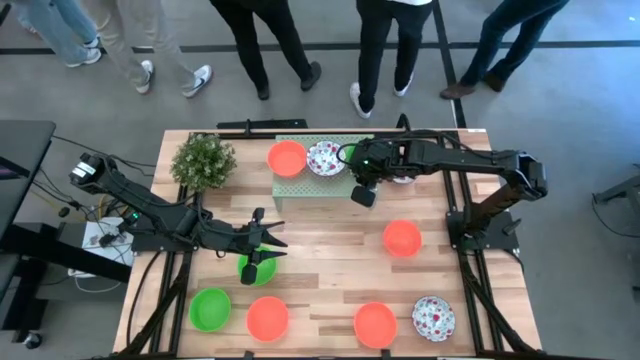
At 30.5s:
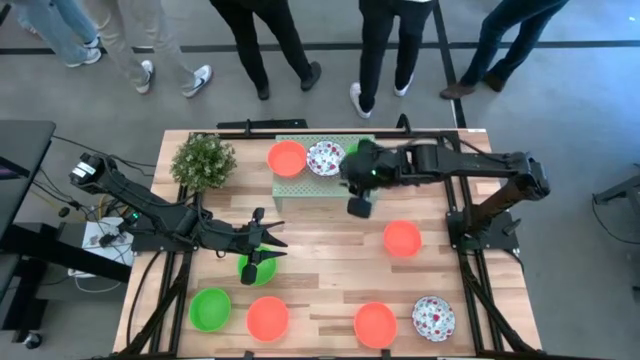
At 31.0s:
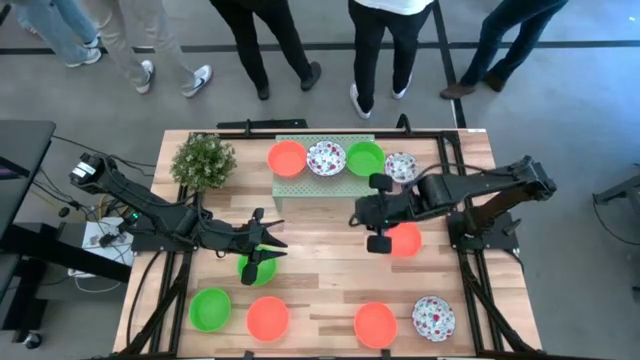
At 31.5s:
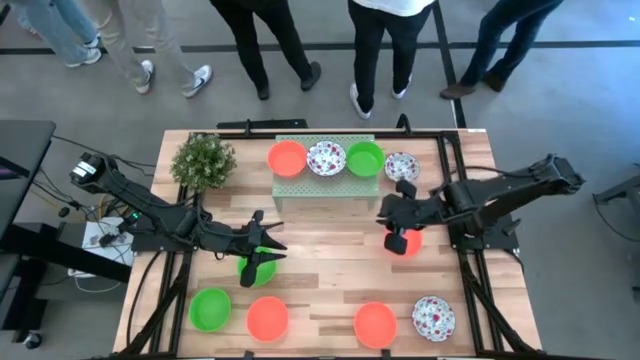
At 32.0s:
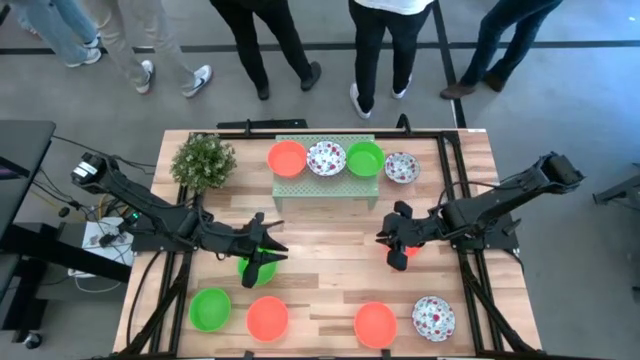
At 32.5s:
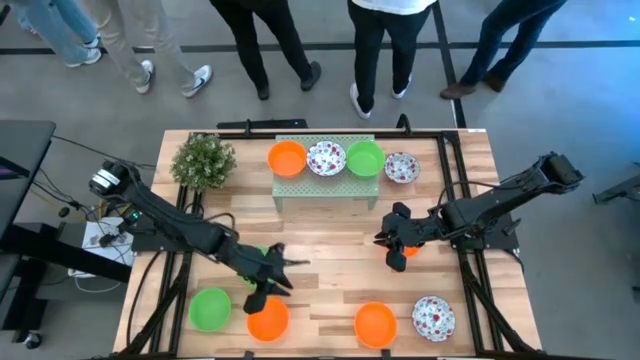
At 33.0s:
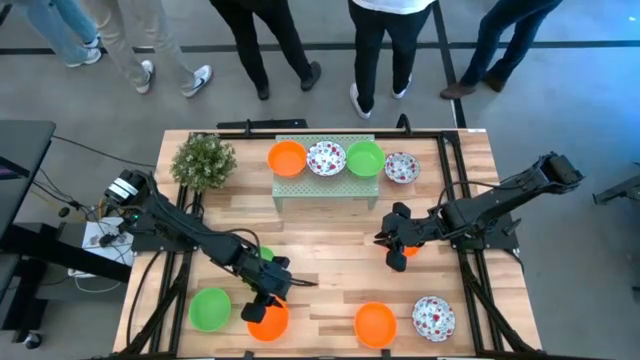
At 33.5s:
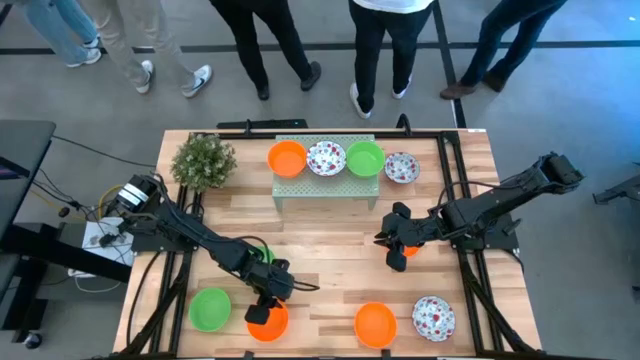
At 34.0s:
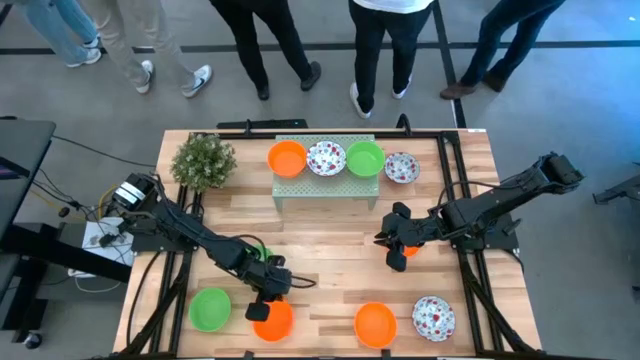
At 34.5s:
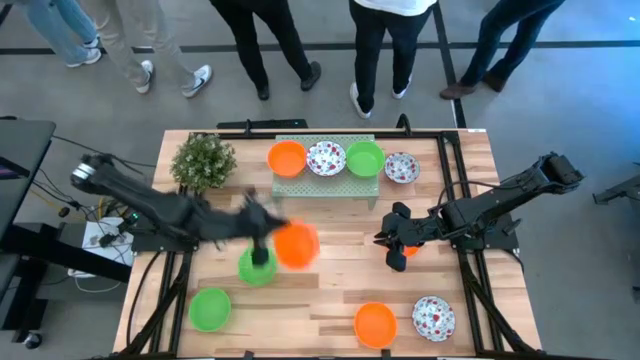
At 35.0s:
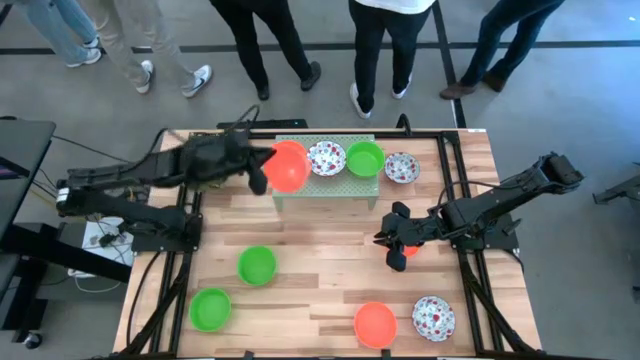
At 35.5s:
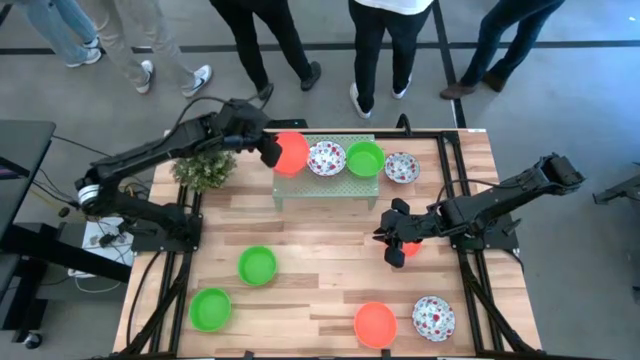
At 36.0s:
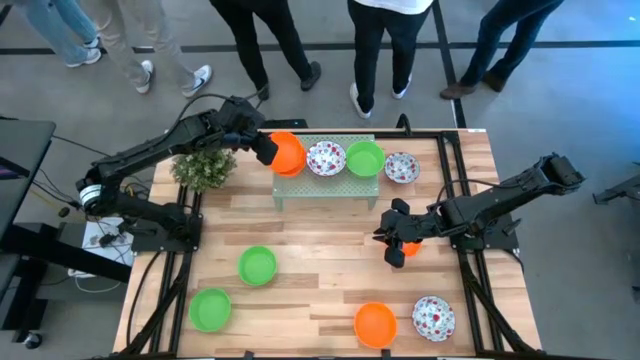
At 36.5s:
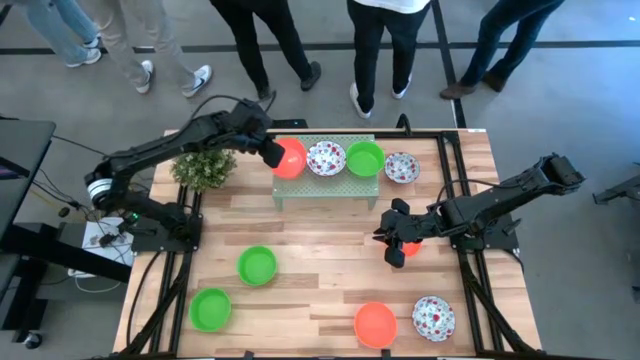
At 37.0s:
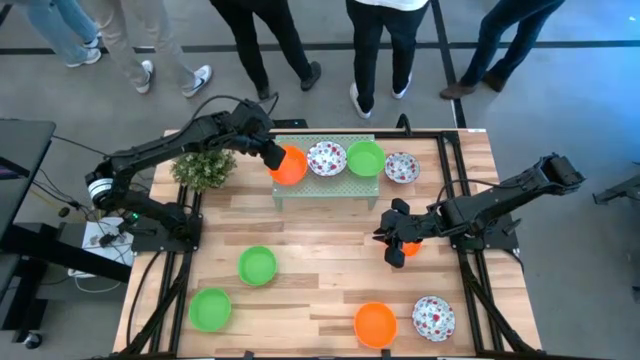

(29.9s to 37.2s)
Task: Pick & Place Mini bowls
Stack the orange bowl onto the other orange bowl on the shelf

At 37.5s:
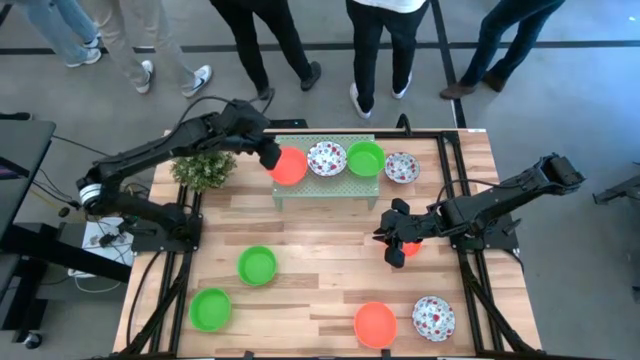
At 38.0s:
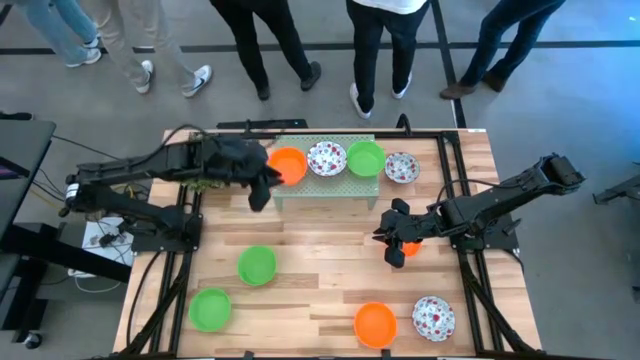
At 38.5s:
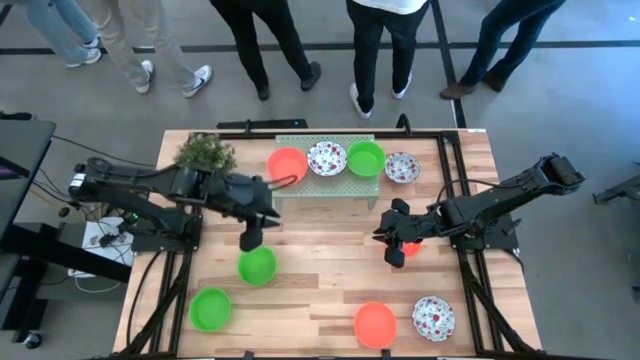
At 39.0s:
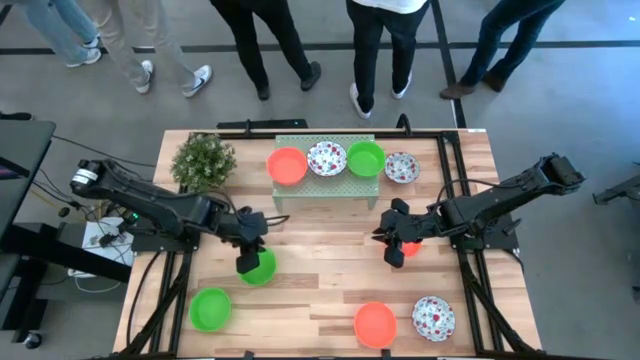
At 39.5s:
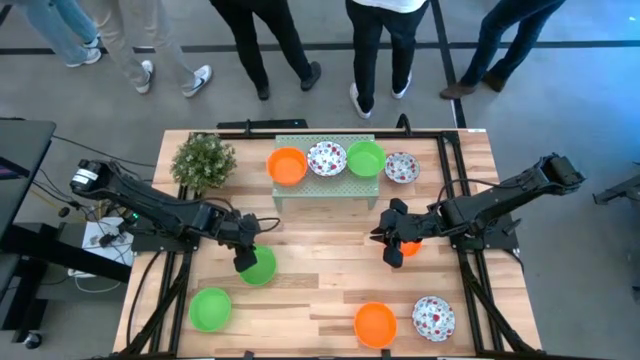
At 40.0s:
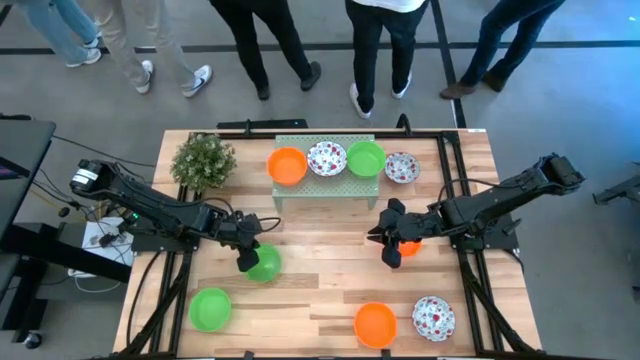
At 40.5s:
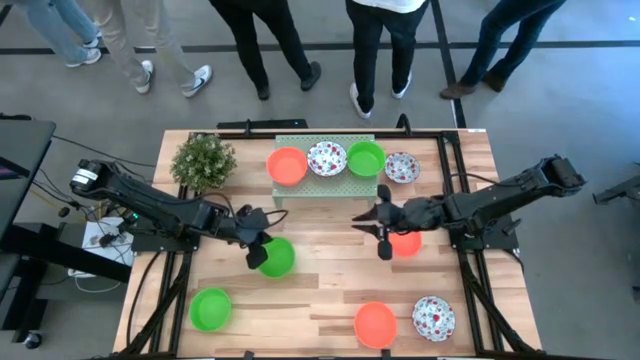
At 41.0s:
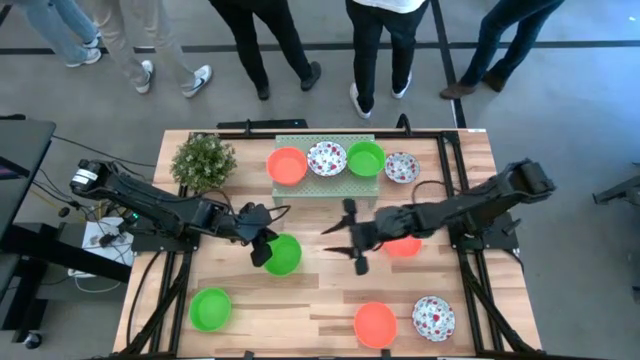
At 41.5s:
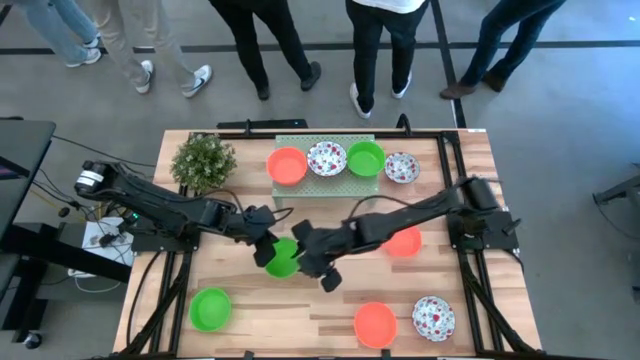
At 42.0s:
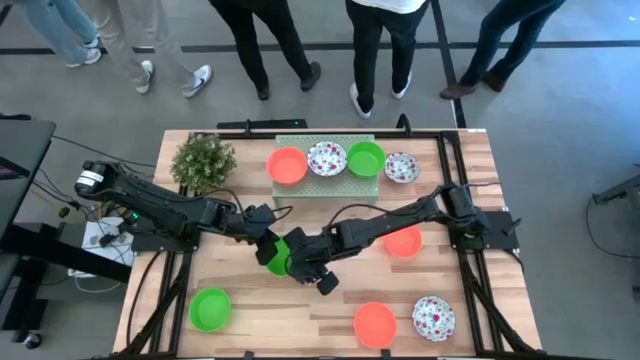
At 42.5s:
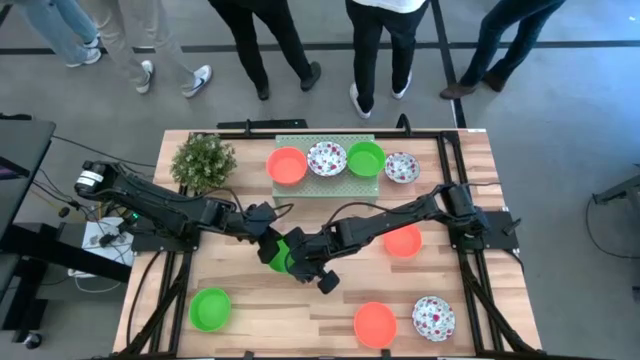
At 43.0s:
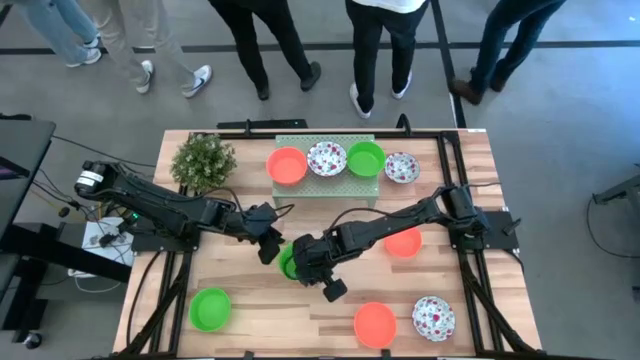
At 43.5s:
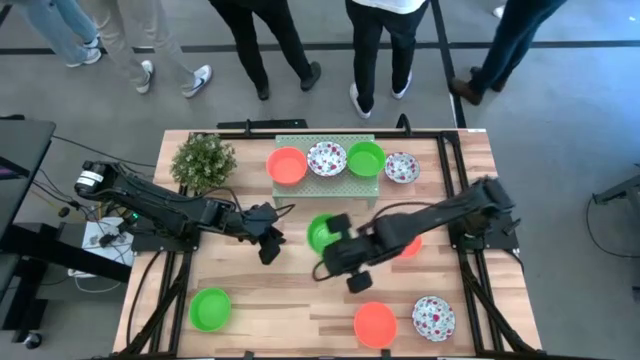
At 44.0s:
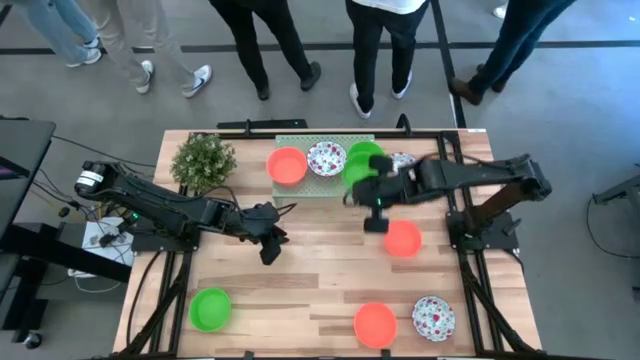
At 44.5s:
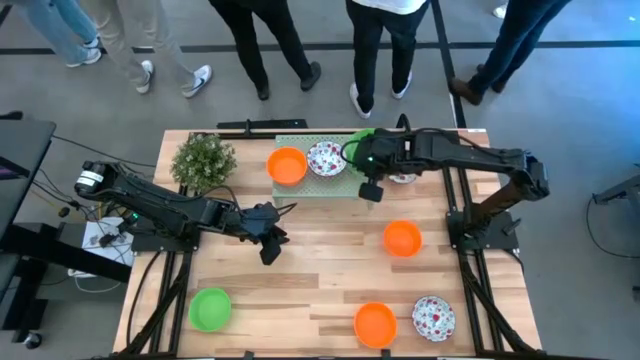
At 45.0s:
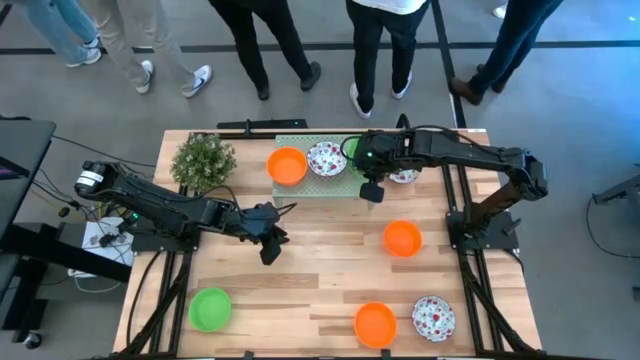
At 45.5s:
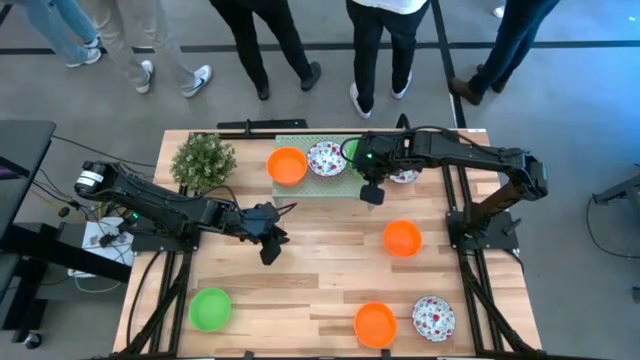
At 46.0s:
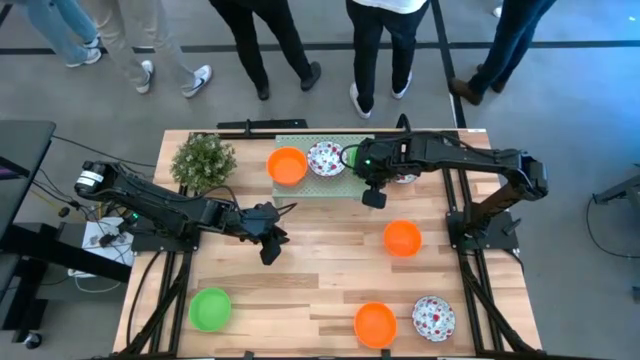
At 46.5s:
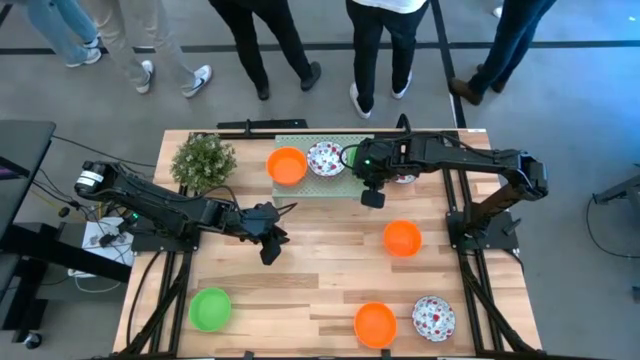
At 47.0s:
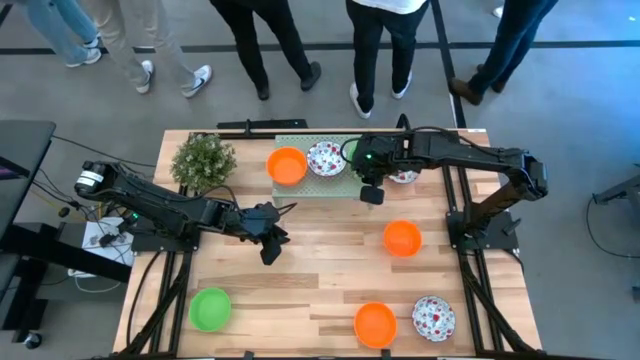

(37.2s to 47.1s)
Stack the right green bowl onto the other green bowl on the shelf

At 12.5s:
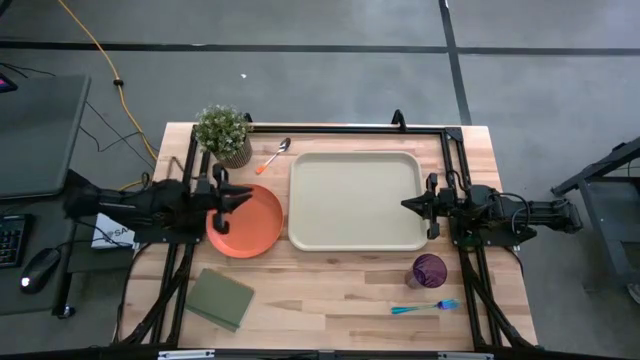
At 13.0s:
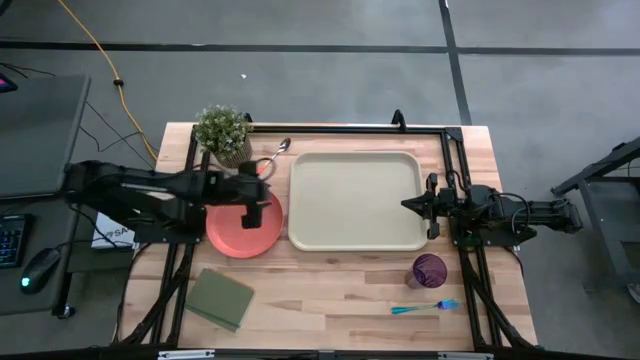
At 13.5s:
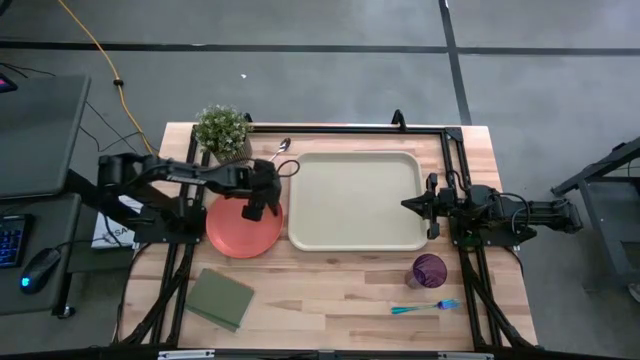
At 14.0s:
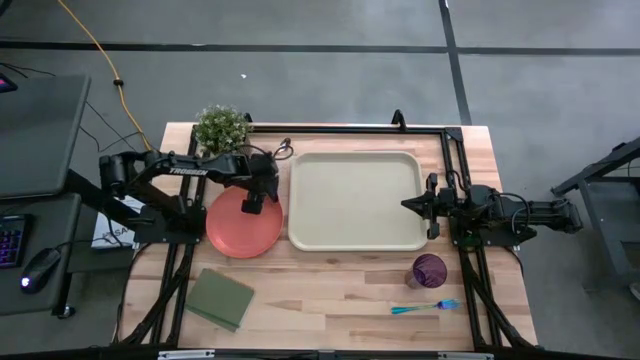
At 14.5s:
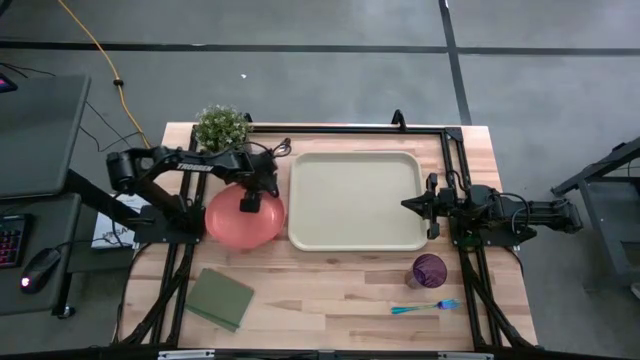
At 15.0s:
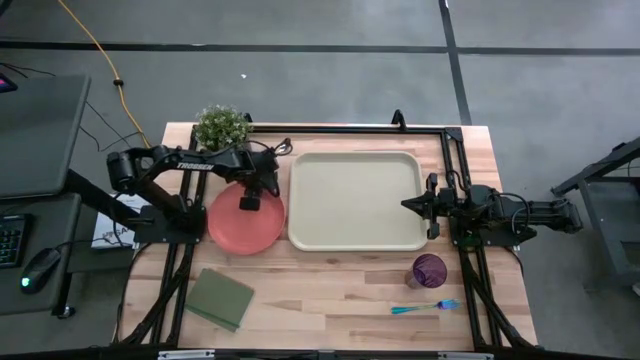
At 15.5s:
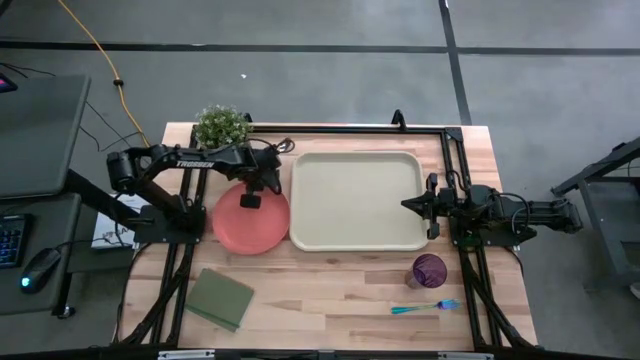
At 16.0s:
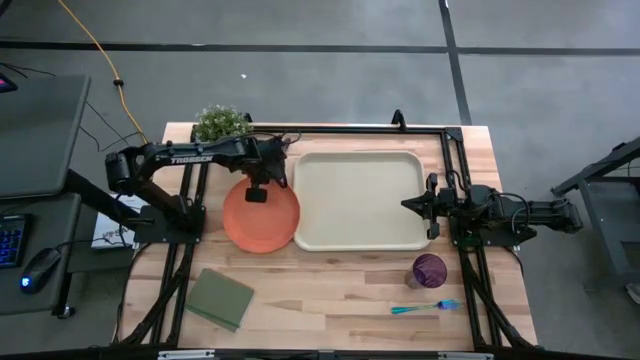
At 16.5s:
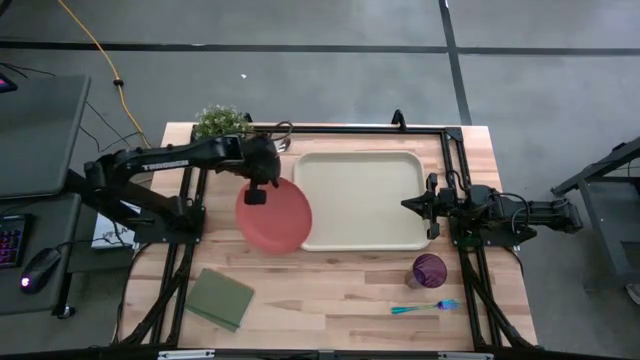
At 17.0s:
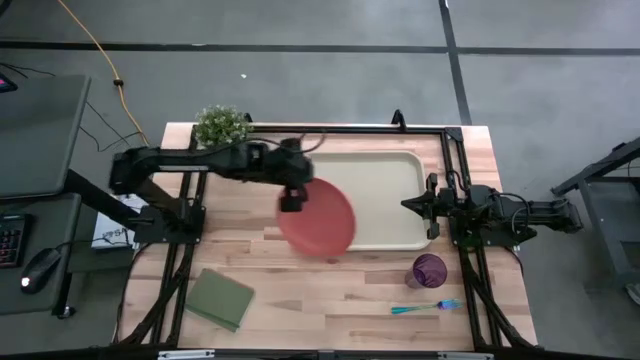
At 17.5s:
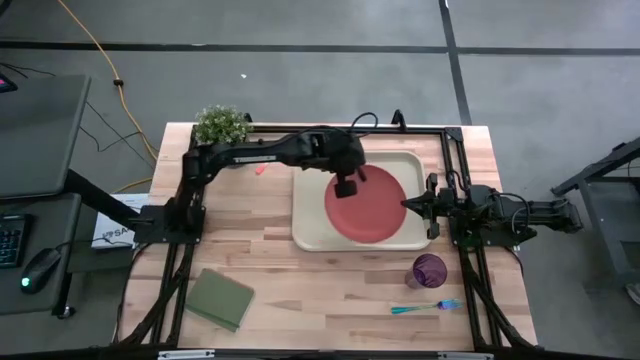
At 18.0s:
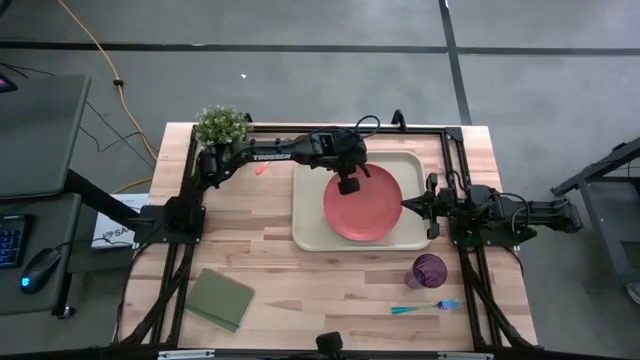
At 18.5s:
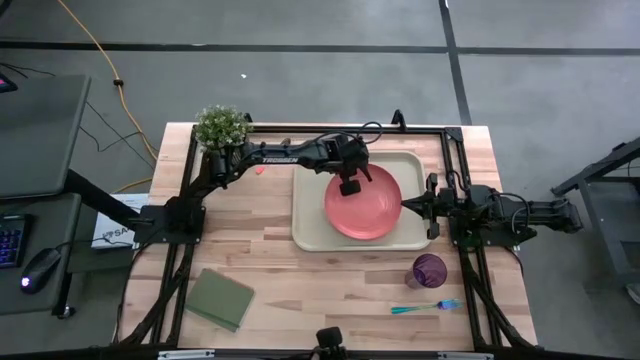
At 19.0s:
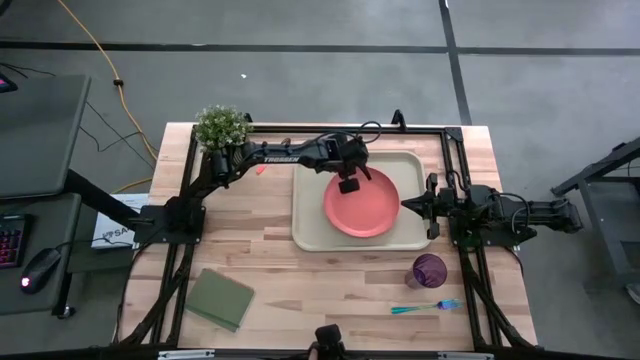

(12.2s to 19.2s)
Task: Pick and place plate/cup/fork/spoon on tray
Put the orange plate on the white serving tray
